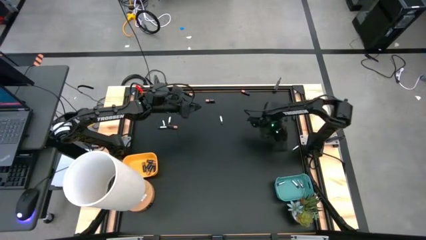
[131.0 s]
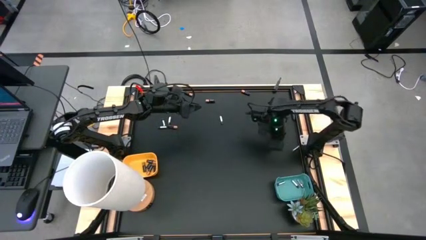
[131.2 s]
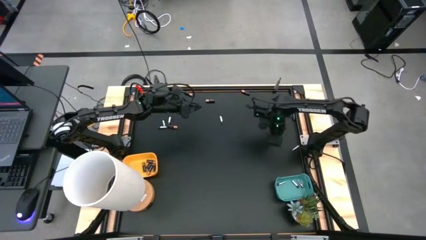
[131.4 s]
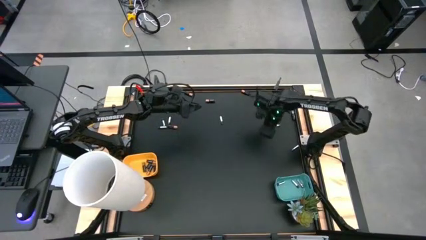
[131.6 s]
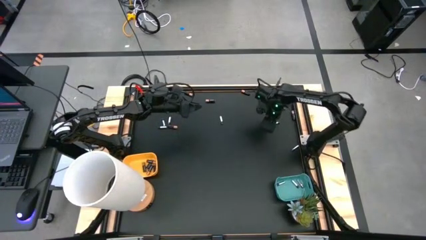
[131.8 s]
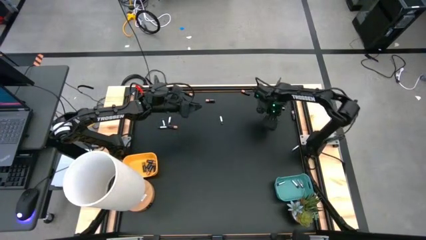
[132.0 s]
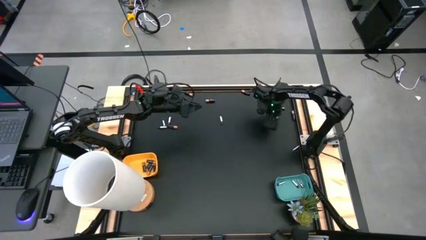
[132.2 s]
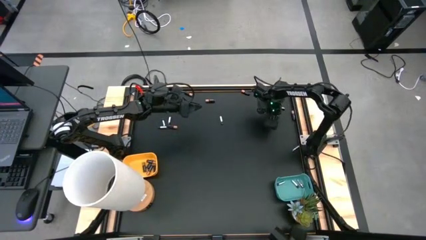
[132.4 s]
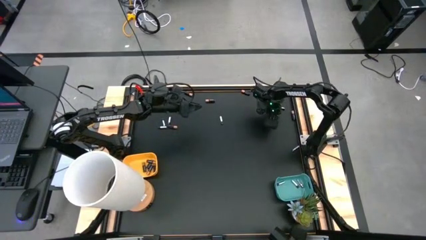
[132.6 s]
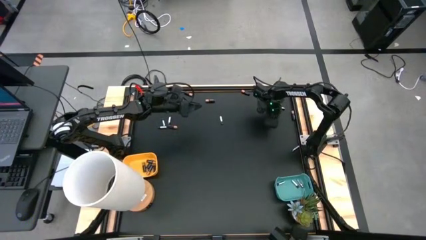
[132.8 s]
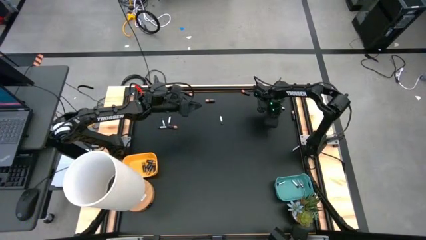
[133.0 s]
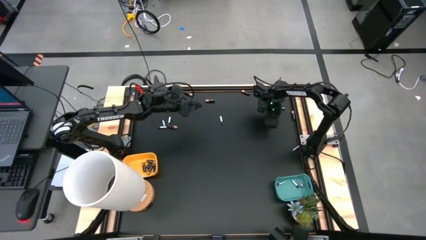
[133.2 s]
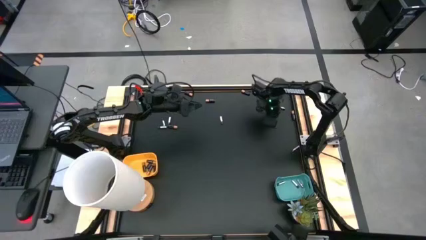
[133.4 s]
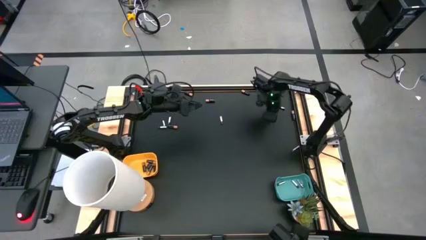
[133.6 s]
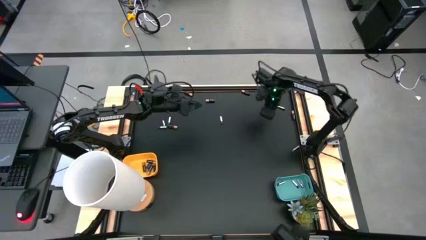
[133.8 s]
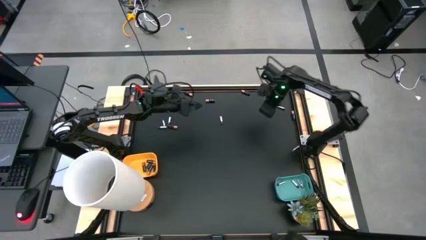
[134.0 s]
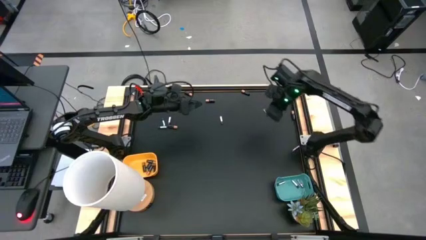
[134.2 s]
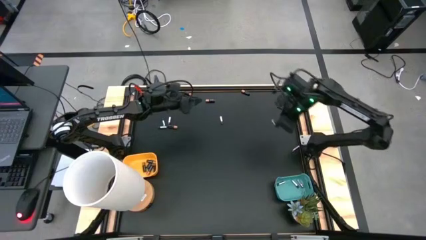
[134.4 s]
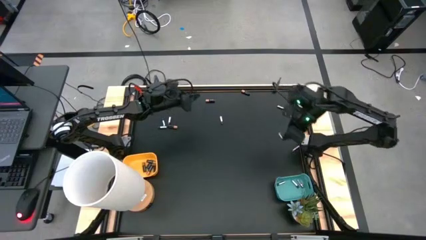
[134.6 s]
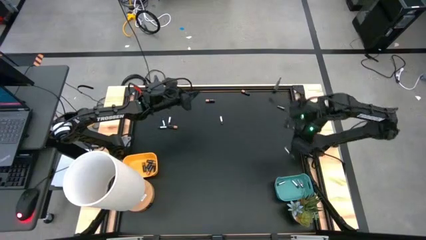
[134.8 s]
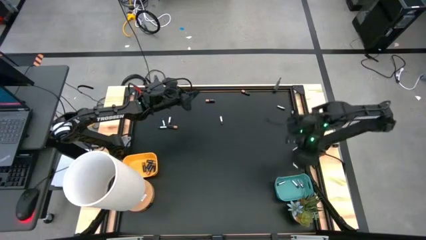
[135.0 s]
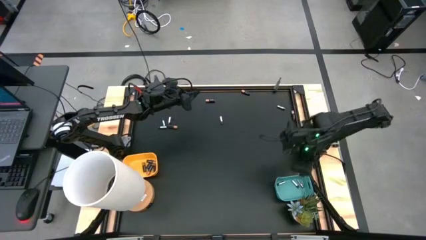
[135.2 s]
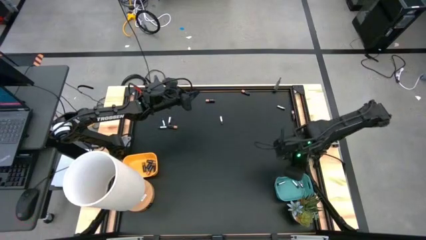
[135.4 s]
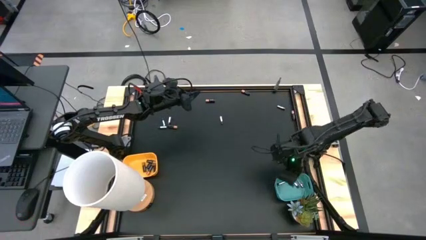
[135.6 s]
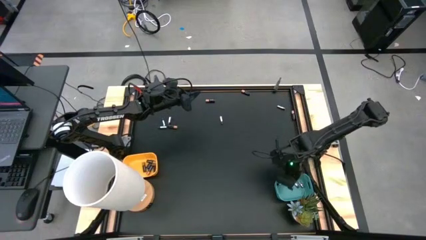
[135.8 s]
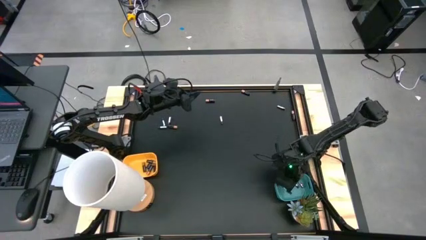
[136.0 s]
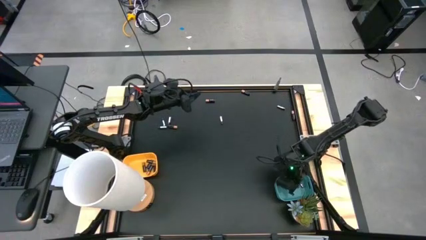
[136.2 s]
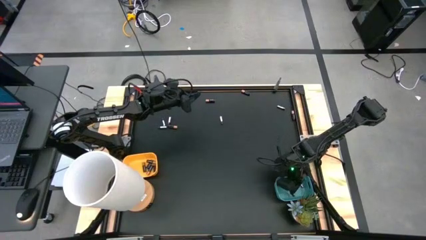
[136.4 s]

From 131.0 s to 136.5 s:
Task: Sort batteries
Put the silver battery into the green bin

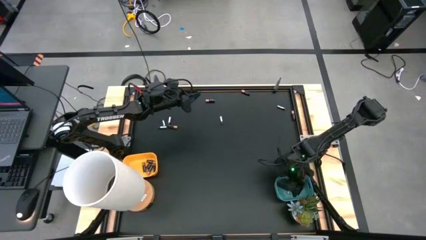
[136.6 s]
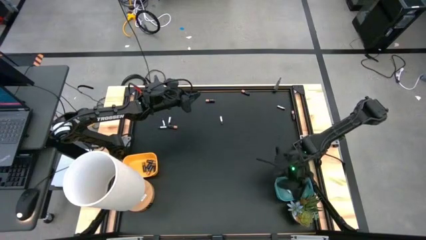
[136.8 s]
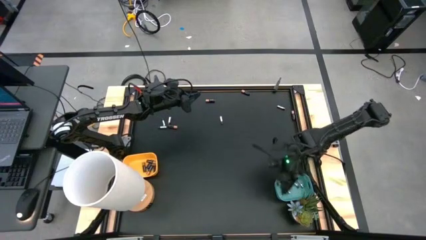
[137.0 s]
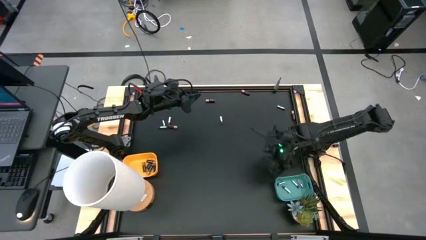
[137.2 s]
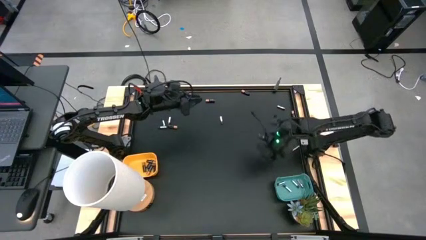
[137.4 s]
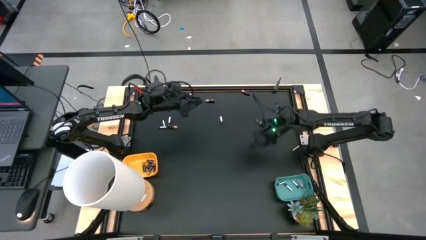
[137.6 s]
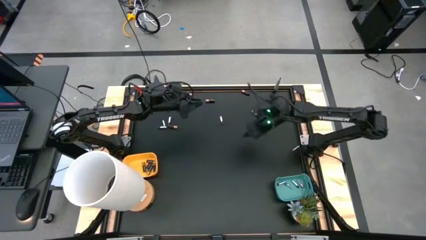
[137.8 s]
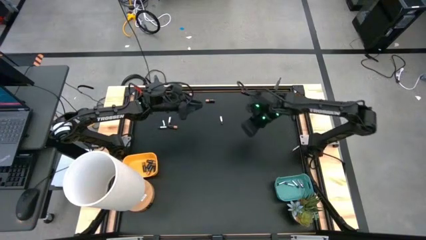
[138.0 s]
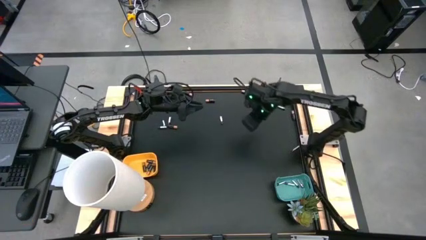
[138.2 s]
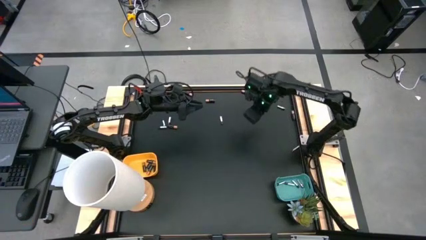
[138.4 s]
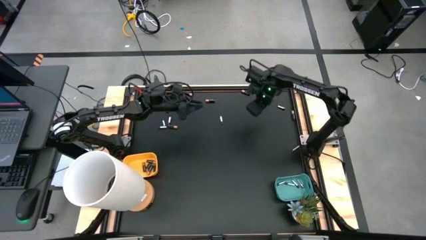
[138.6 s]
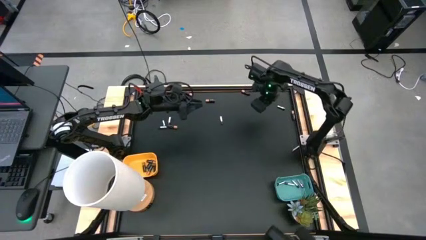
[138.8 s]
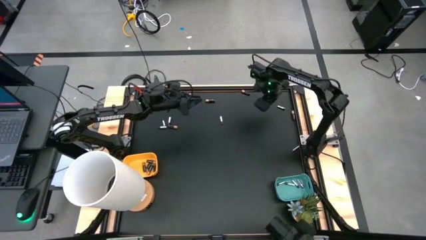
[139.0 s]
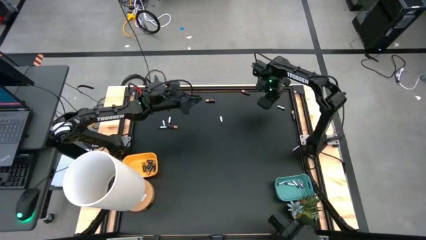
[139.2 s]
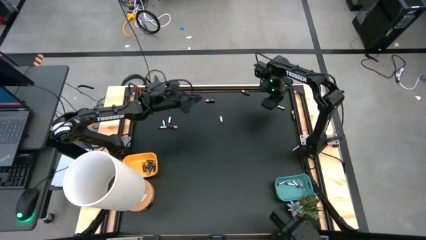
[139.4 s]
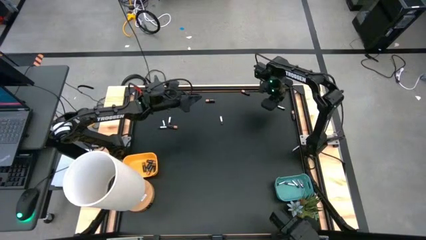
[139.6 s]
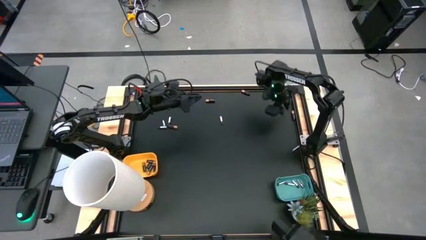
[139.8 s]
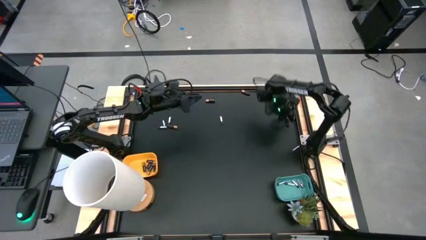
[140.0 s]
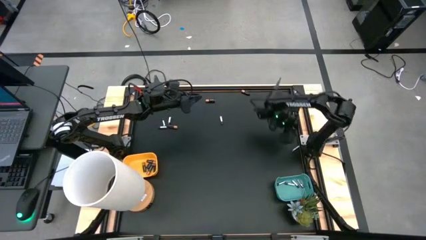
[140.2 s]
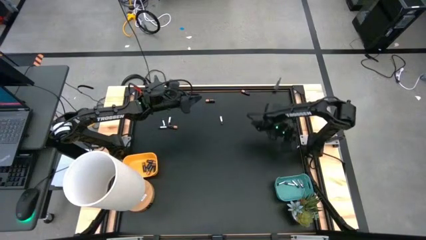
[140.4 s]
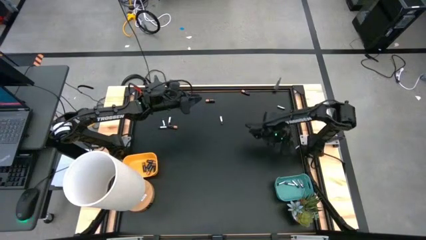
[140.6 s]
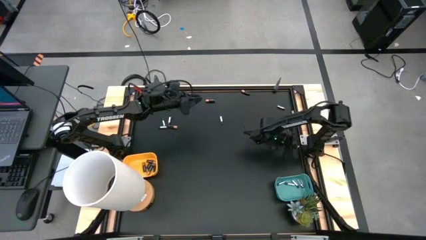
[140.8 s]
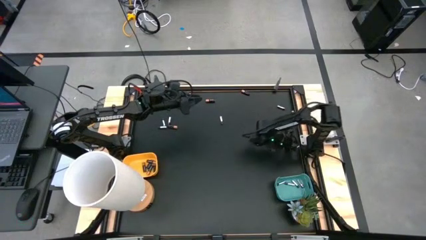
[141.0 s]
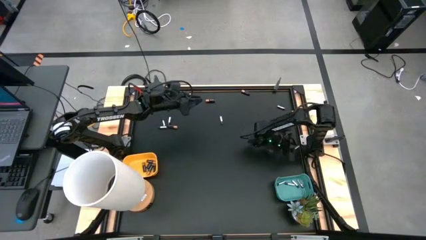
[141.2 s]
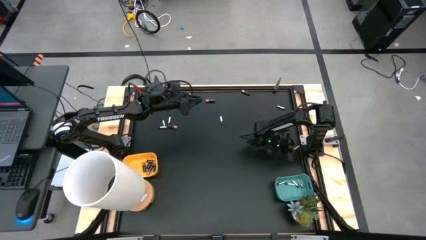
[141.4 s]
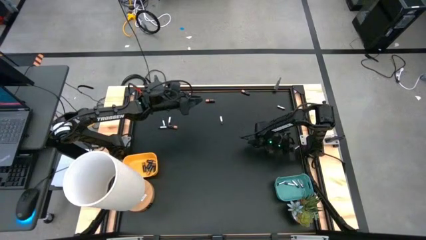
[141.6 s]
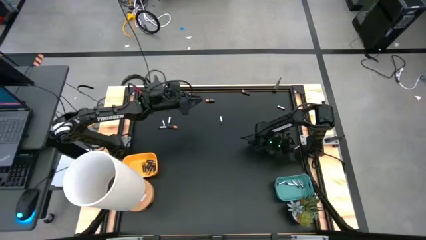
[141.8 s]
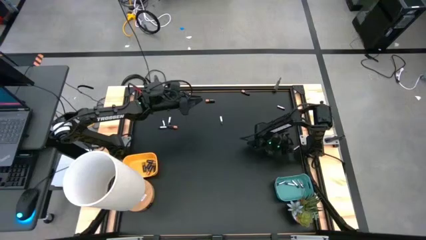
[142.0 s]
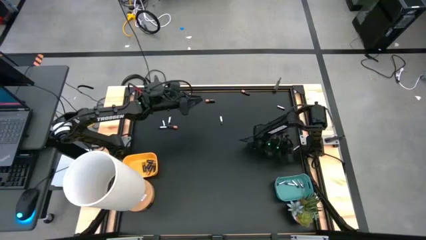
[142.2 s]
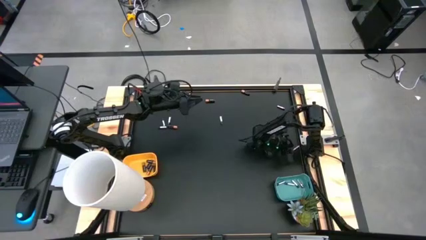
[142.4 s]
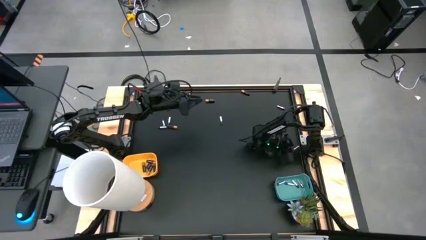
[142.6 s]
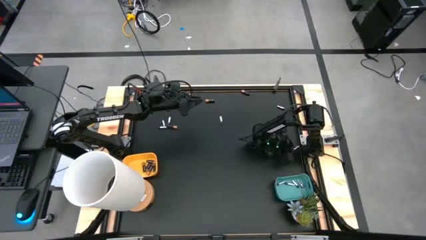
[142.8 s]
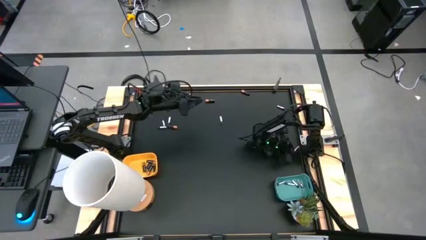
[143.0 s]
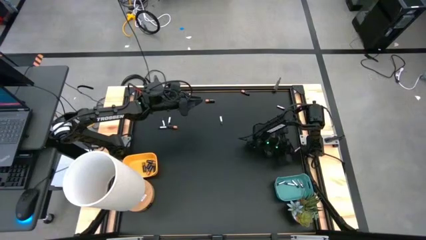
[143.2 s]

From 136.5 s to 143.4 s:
Put the silver battery into the green bin

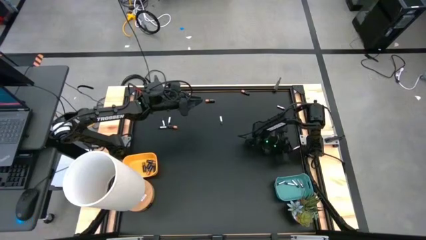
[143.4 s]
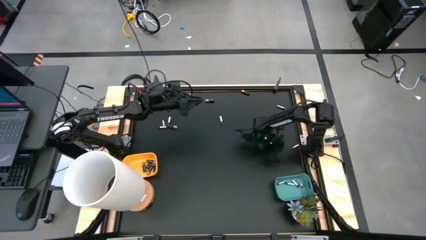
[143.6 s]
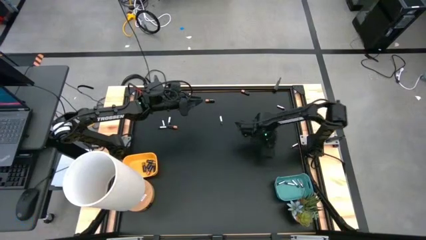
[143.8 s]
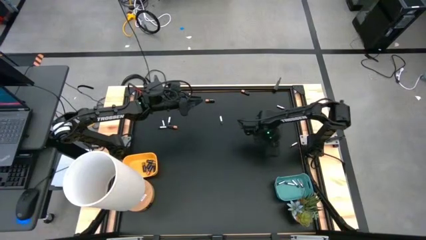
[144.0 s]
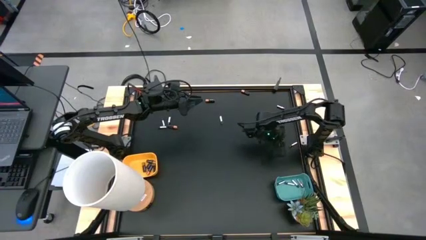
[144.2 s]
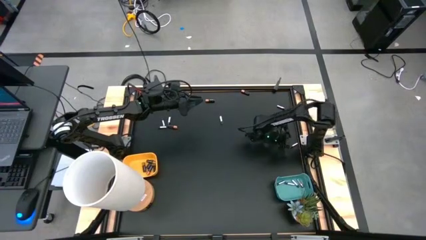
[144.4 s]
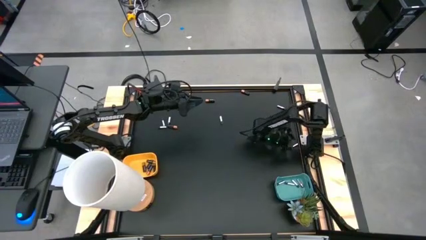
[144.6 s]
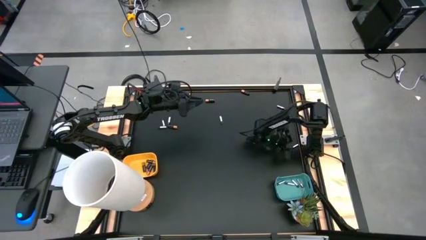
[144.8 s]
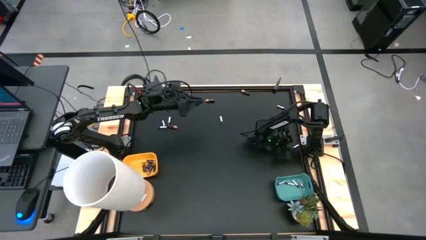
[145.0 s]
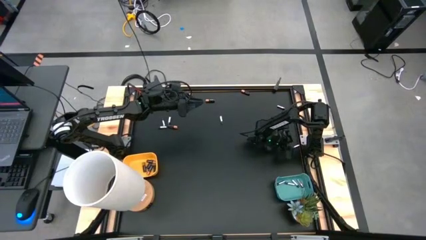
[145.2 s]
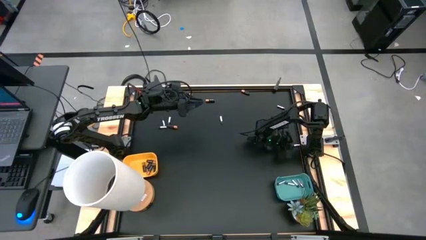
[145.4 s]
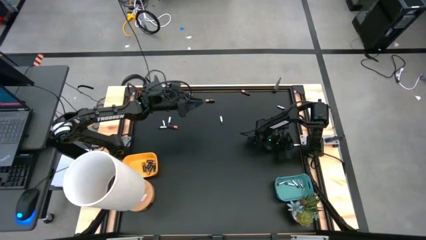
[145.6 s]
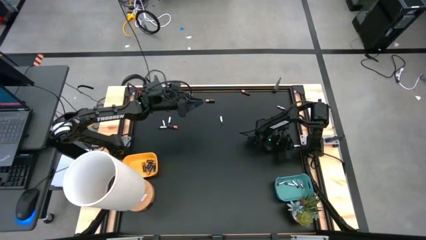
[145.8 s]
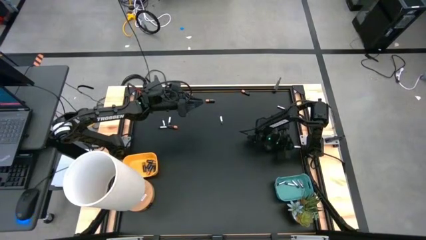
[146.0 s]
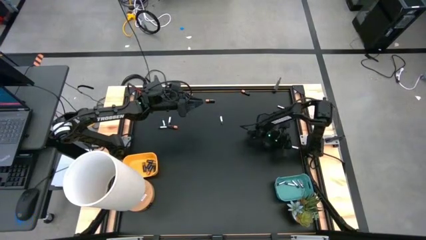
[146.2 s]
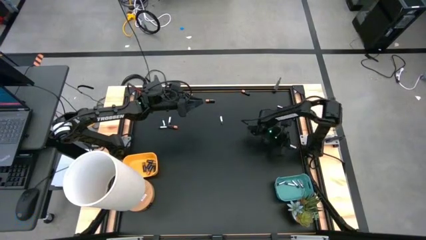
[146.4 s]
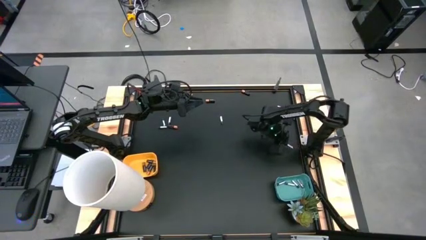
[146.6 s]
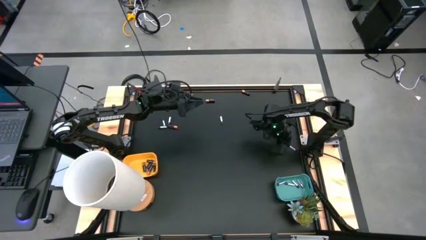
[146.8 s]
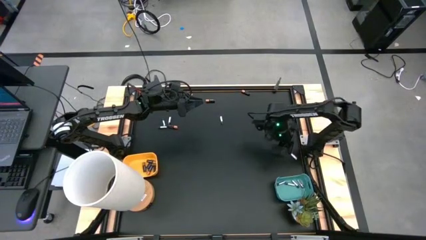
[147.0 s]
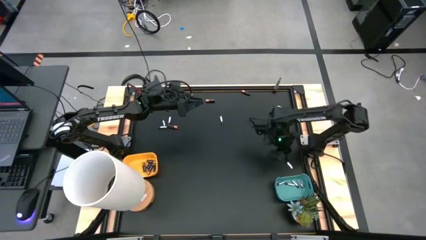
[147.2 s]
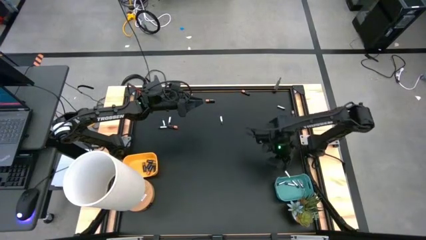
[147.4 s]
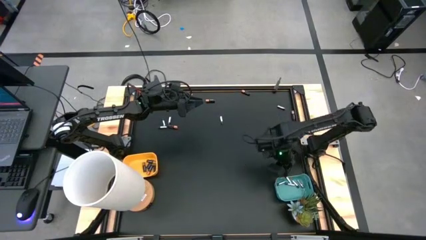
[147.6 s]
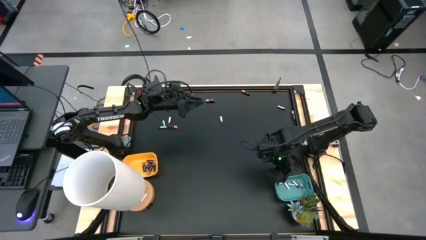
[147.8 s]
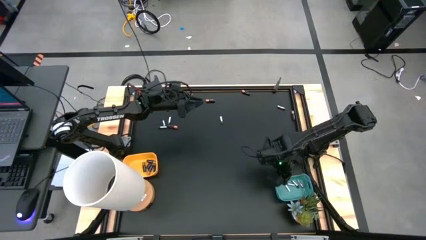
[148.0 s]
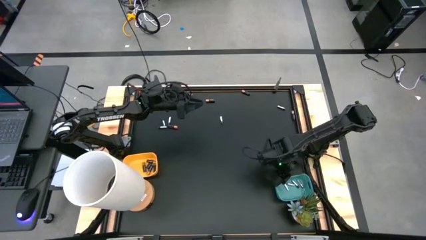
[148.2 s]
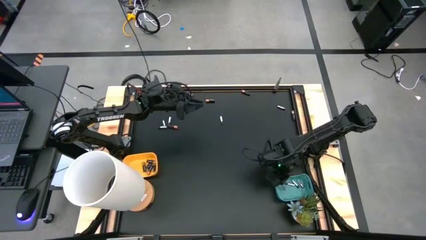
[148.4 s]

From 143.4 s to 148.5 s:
Put the silver battery into the green bin
